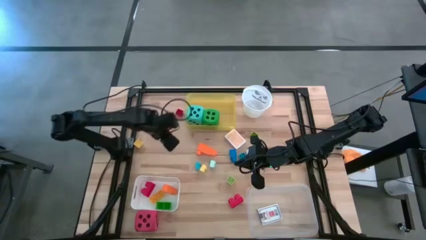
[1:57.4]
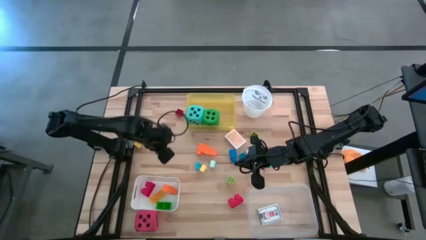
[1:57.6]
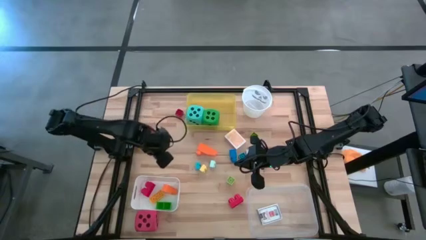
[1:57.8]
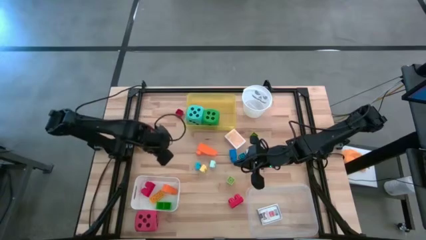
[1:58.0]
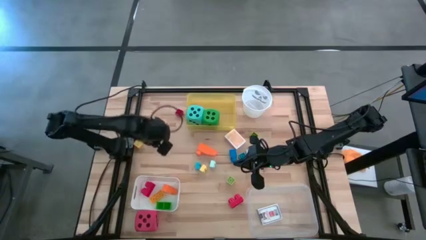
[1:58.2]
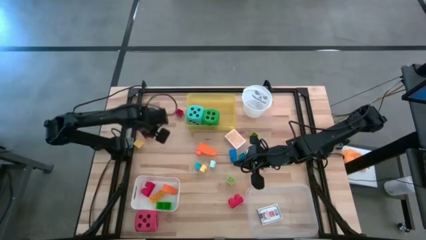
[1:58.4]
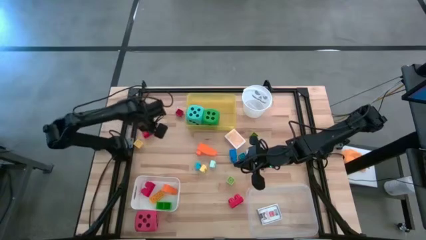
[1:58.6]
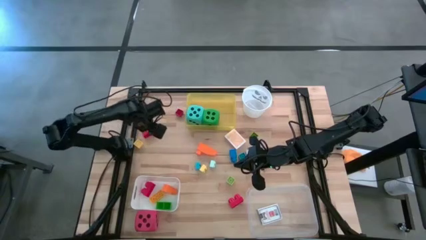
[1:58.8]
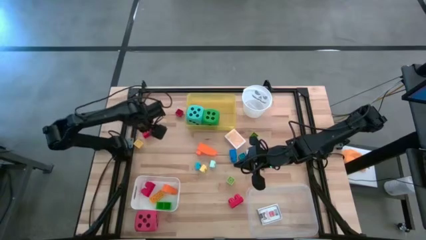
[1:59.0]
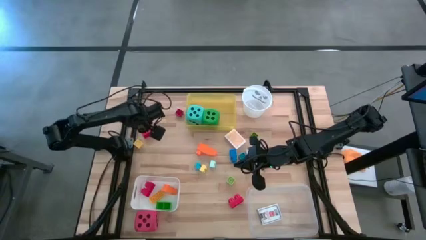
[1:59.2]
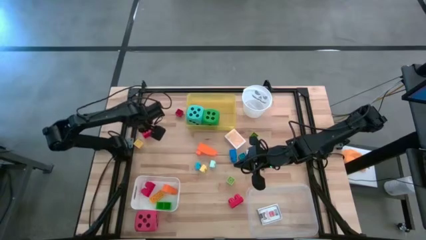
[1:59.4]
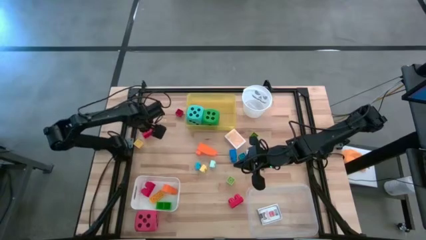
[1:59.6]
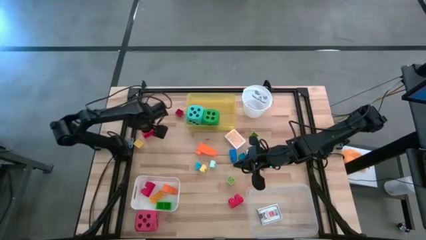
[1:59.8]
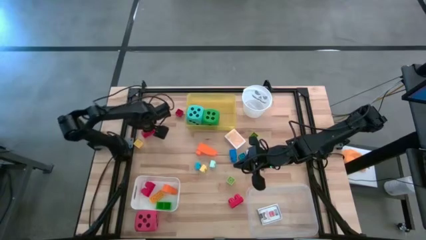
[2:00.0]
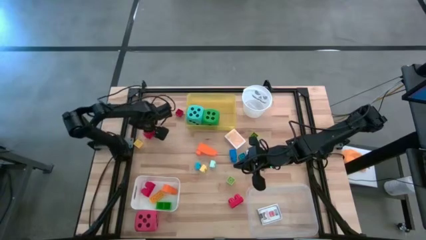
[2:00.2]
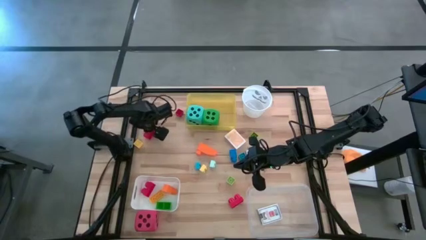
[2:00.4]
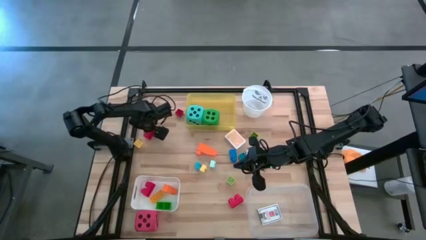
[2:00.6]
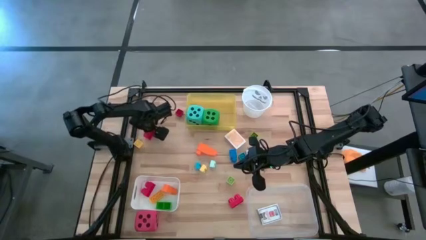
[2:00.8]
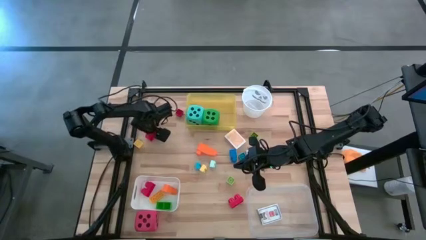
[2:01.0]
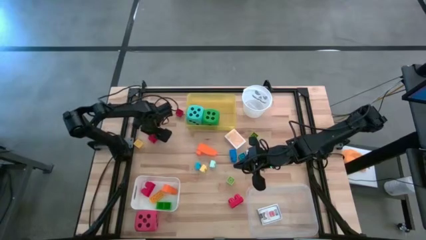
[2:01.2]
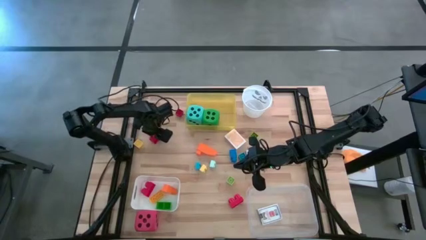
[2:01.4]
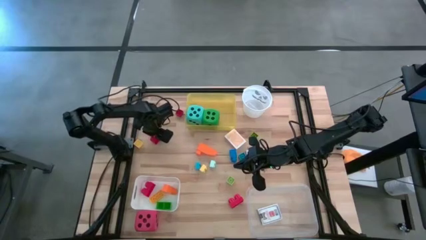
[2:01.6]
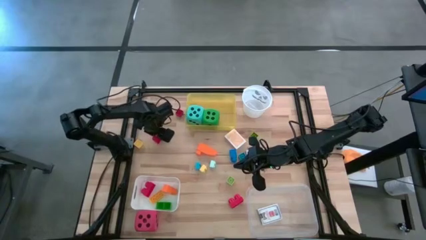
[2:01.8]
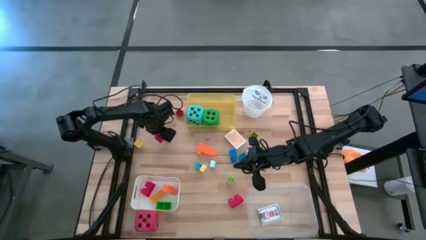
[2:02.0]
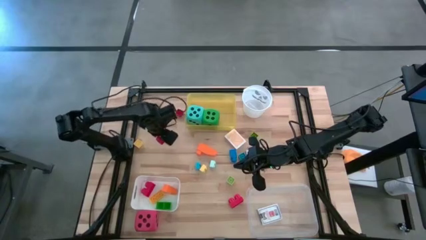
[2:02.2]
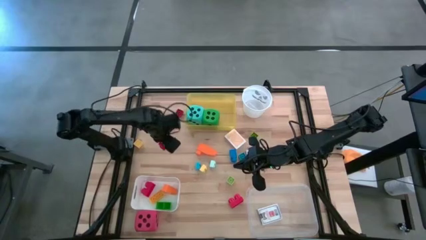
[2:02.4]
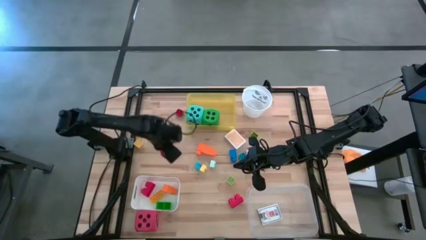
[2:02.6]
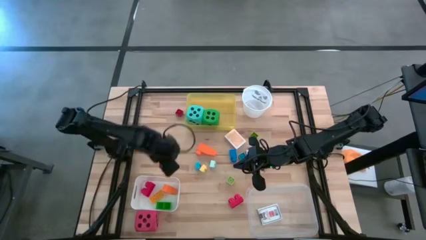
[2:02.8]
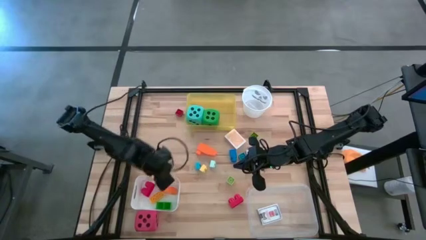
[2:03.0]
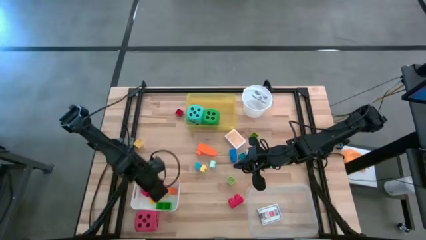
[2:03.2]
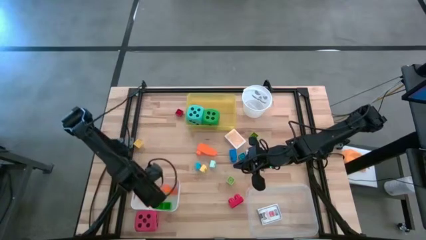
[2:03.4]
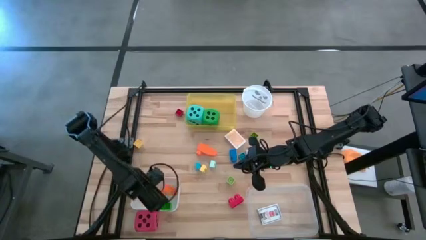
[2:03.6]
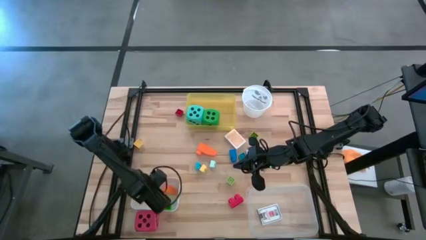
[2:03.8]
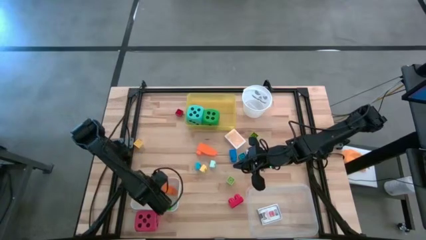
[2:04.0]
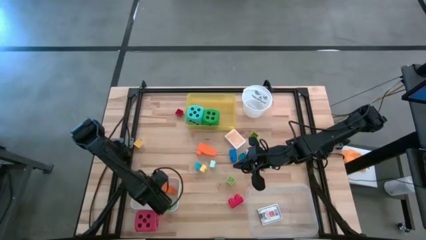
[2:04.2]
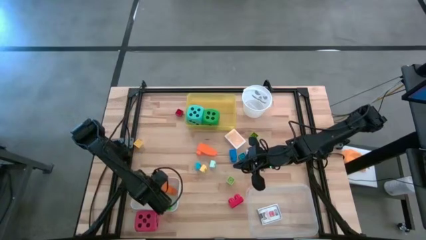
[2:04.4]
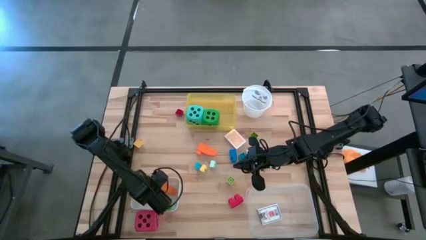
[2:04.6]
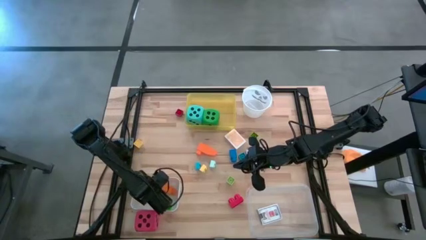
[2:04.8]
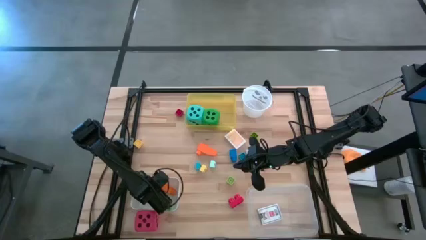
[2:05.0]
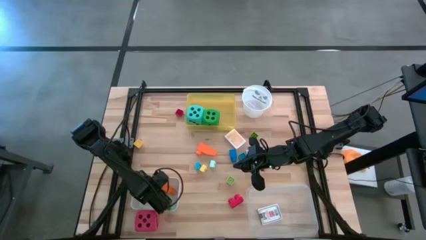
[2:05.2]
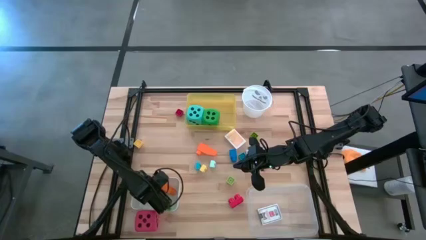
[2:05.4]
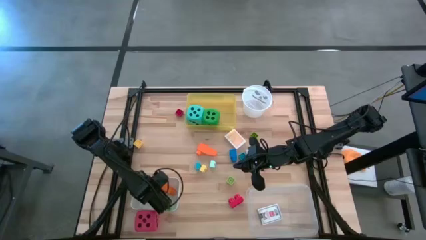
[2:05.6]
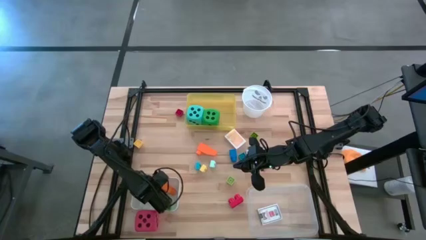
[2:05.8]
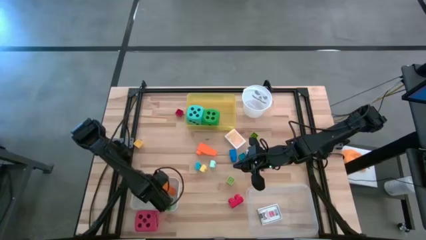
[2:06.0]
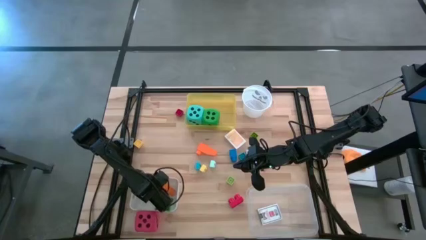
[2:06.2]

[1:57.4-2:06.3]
Task: Pick & Place Toys
Put the top red game piece into the white bin

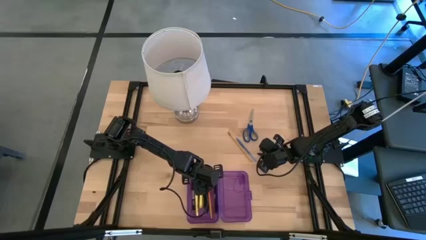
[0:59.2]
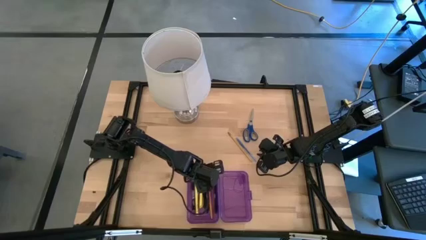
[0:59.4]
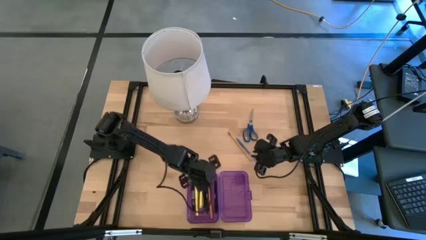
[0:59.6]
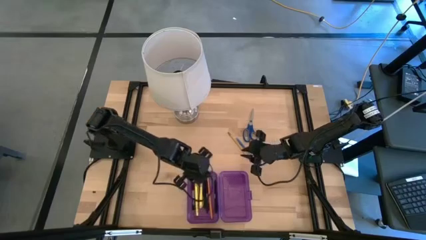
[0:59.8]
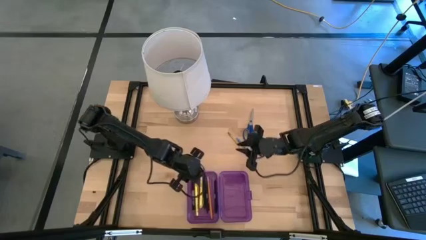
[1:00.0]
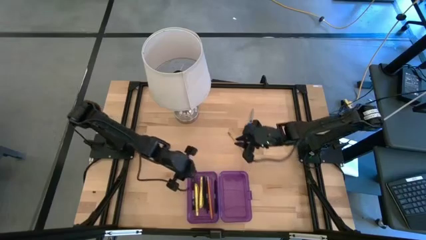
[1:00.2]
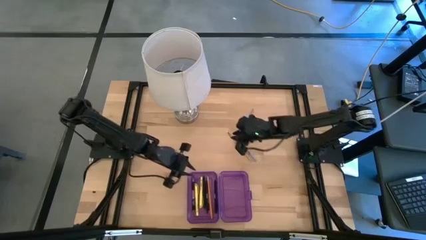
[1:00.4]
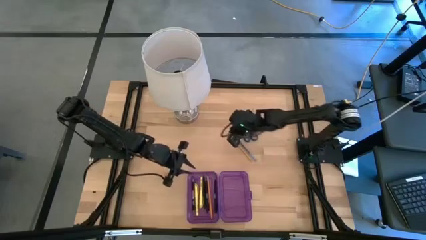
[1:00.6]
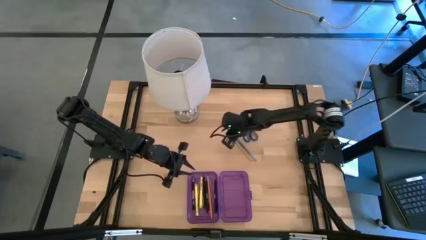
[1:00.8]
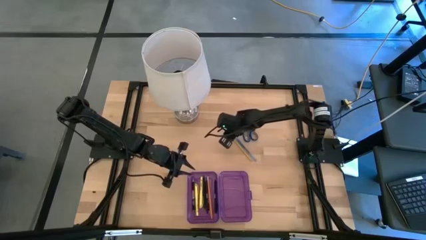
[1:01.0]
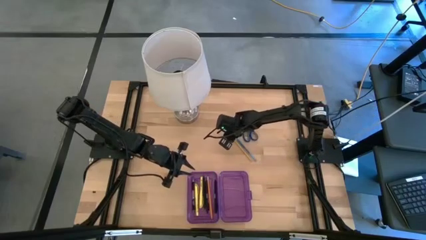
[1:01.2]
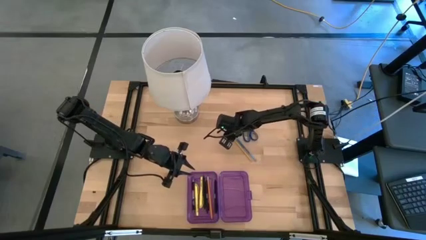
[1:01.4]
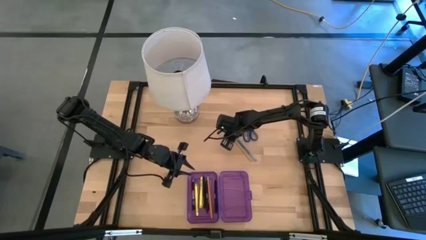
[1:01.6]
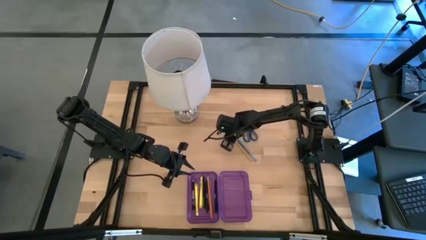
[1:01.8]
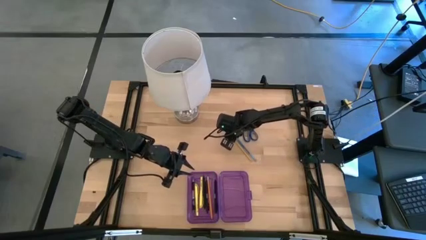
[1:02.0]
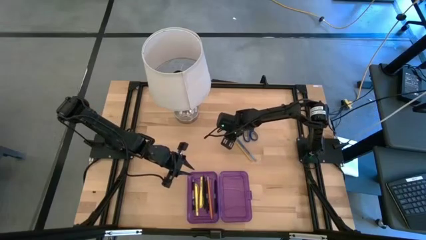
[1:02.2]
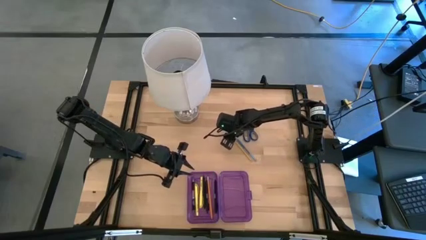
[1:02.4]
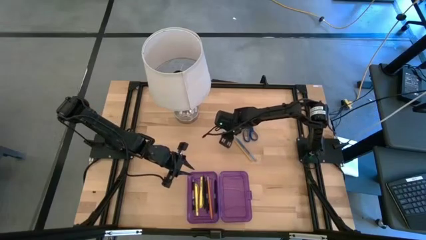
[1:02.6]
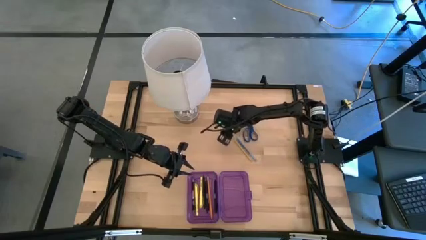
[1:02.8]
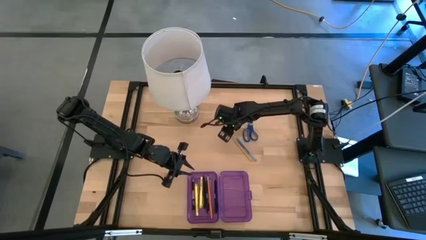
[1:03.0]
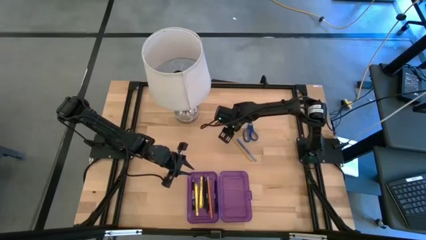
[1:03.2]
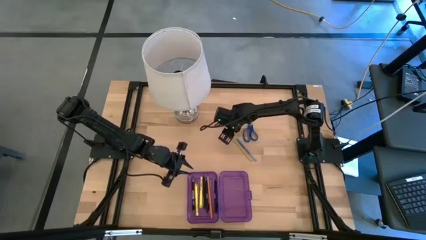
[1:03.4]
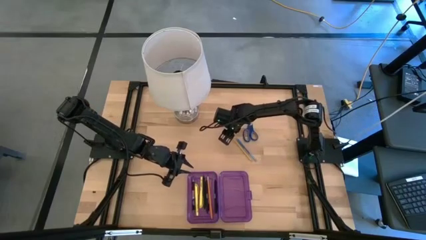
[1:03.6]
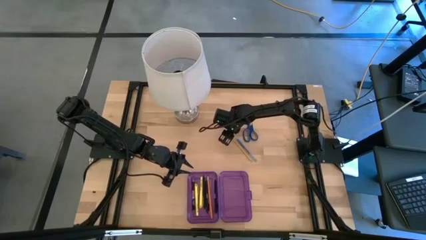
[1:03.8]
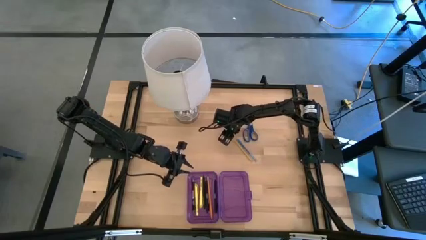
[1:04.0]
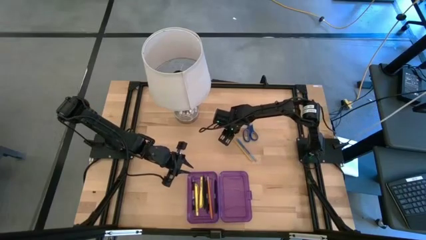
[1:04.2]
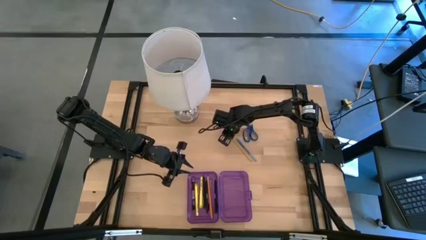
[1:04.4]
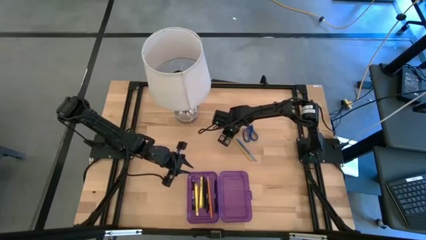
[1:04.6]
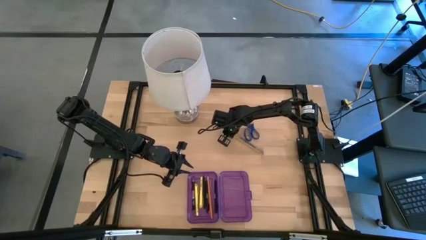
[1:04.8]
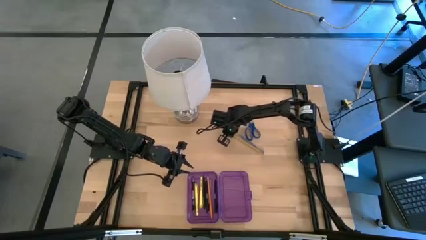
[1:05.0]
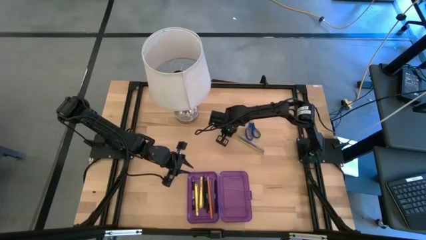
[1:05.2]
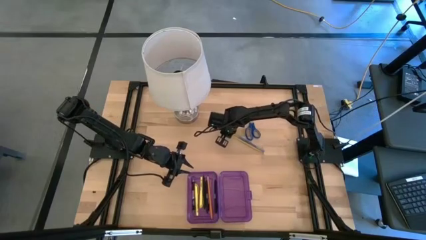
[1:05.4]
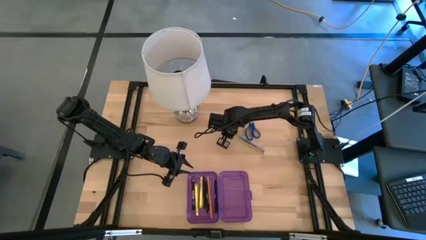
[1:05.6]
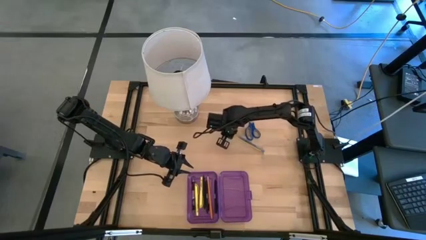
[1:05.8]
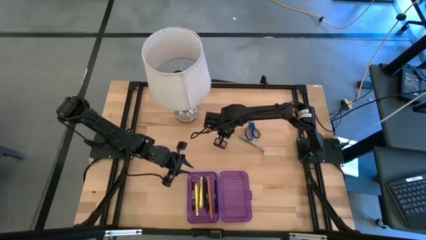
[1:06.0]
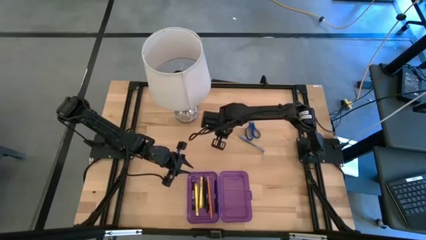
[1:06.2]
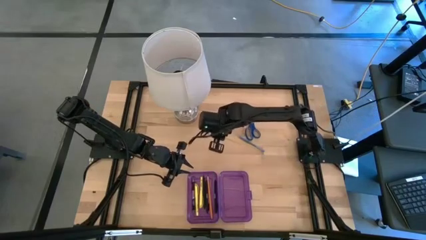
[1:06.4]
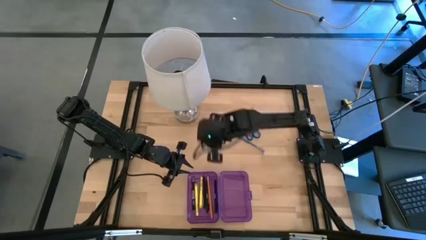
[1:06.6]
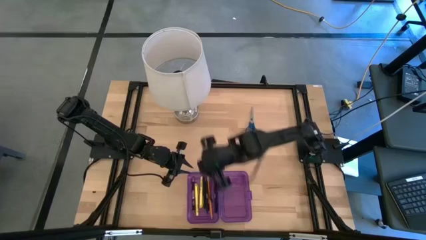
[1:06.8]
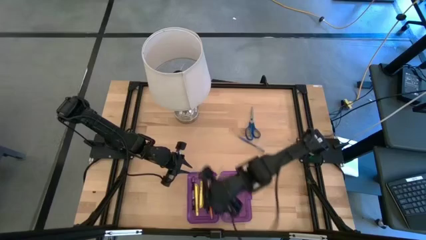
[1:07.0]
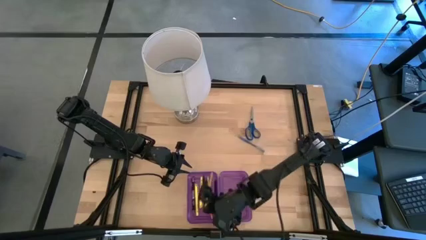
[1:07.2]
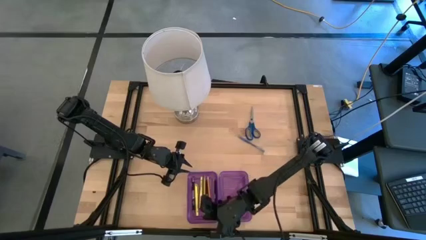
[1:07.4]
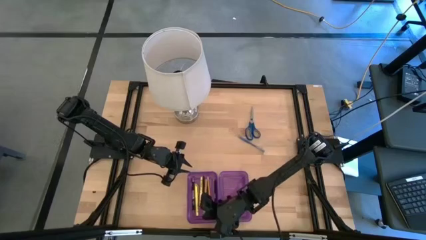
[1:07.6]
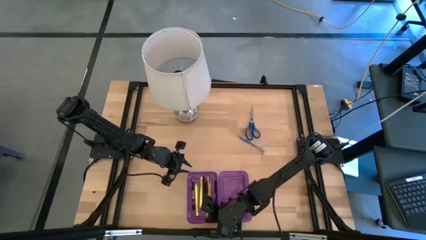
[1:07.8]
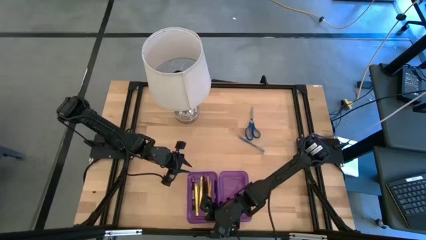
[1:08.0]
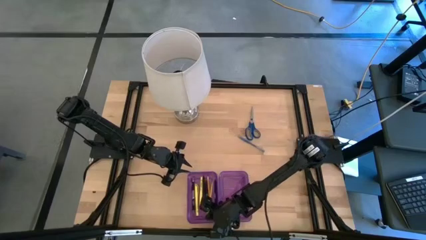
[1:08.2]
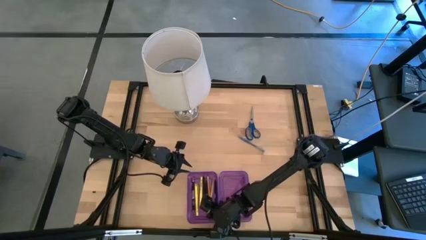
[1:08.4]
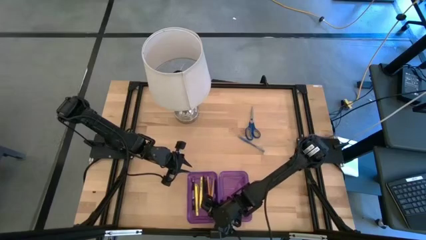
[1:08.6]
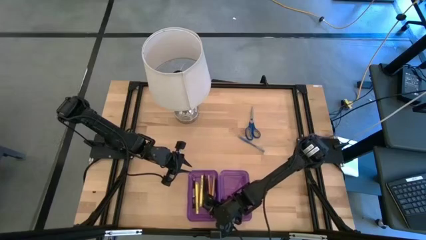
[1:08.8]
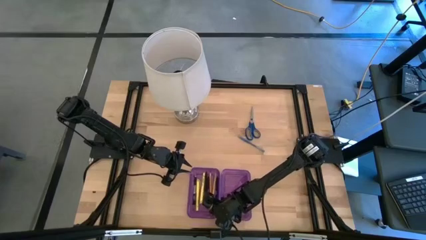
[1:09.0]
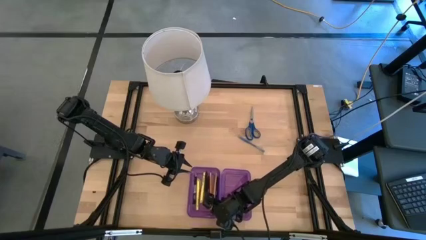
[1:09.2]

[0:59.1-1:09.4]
Task: Pick & place school supplies into a supply box
Put the yellow pencil into the violet supply box
